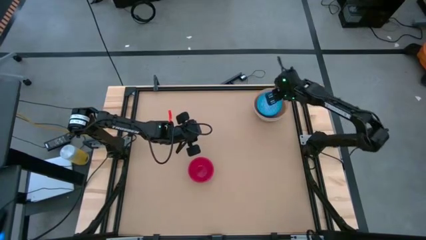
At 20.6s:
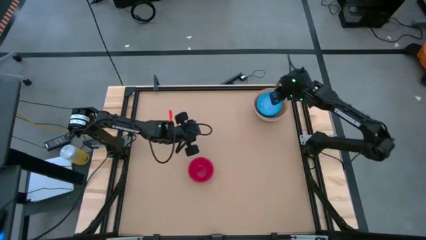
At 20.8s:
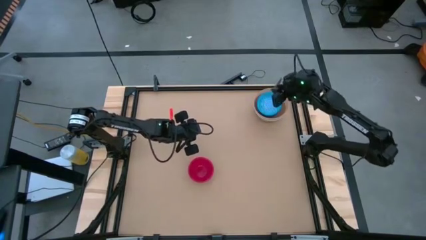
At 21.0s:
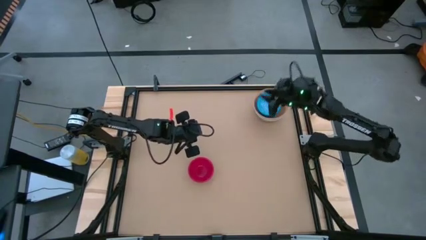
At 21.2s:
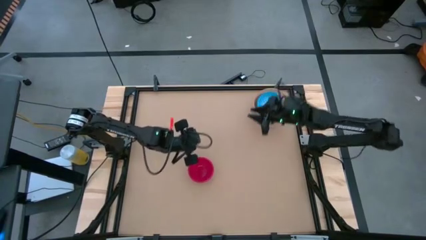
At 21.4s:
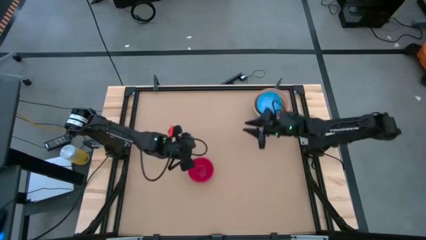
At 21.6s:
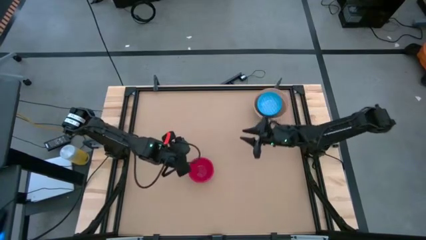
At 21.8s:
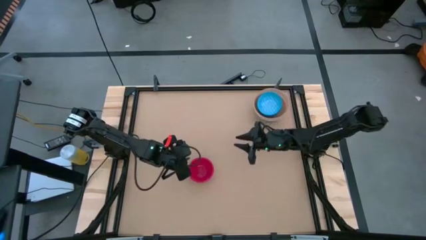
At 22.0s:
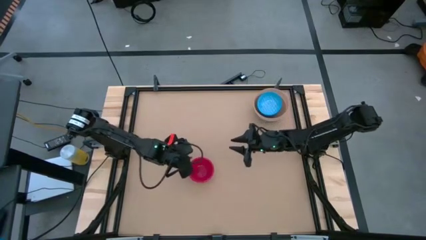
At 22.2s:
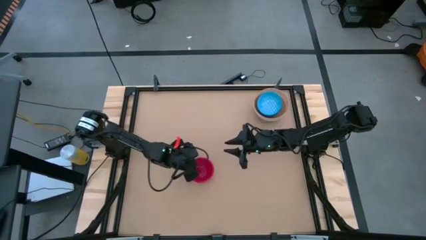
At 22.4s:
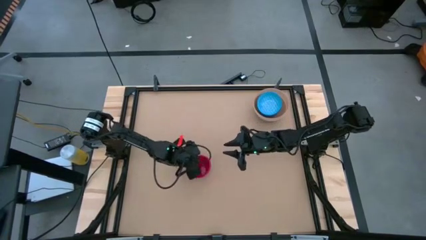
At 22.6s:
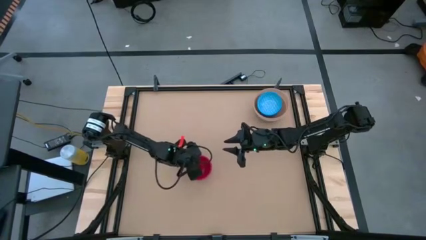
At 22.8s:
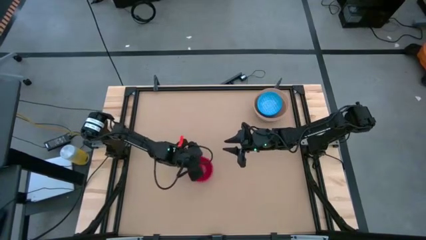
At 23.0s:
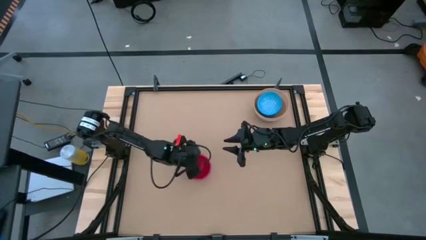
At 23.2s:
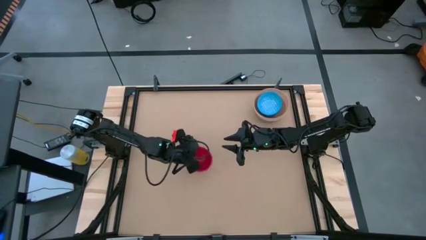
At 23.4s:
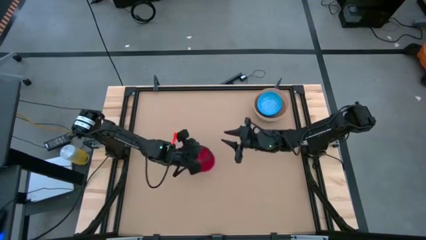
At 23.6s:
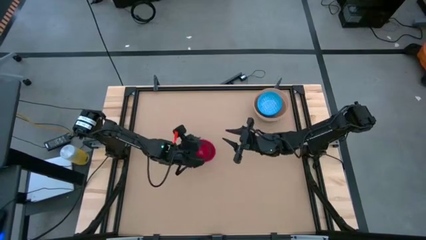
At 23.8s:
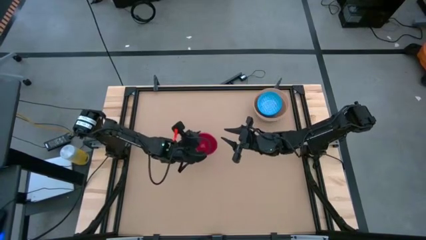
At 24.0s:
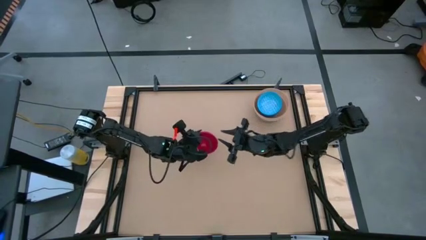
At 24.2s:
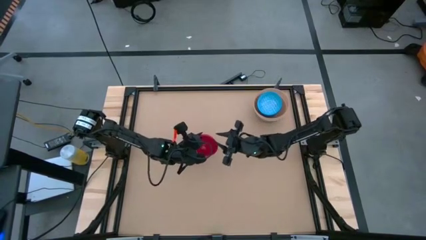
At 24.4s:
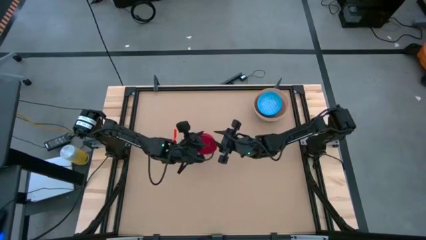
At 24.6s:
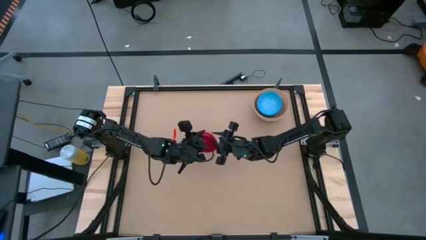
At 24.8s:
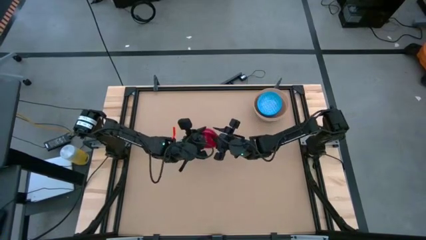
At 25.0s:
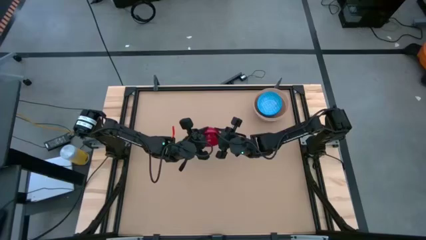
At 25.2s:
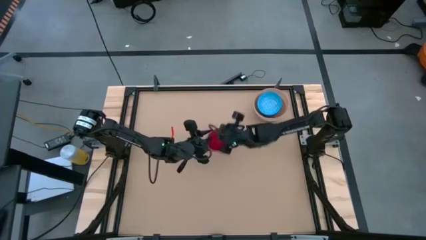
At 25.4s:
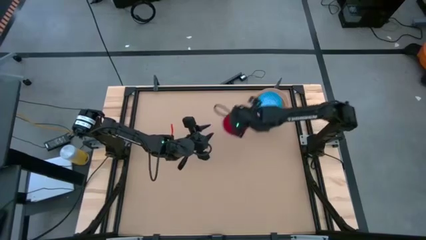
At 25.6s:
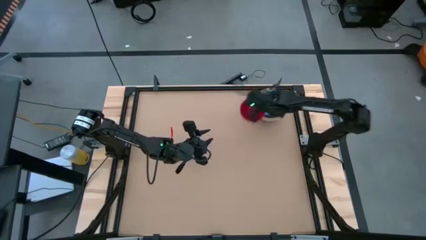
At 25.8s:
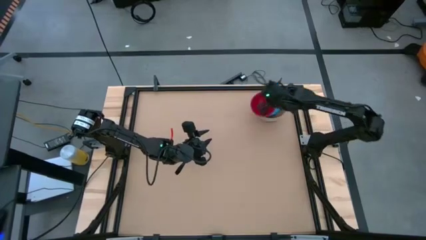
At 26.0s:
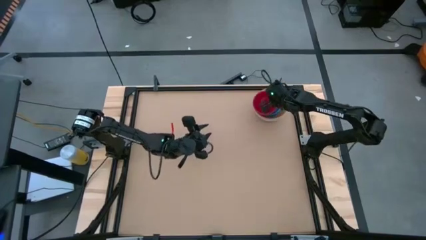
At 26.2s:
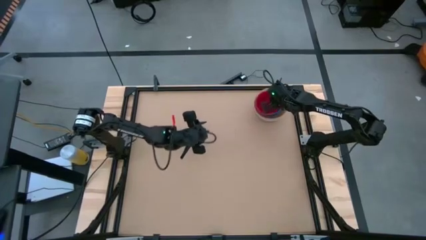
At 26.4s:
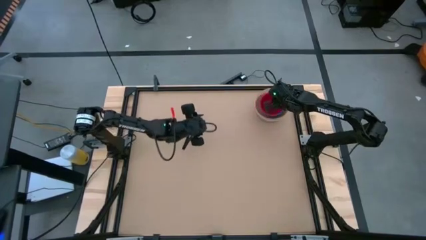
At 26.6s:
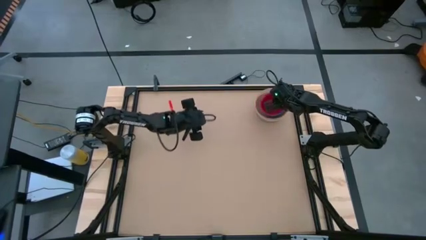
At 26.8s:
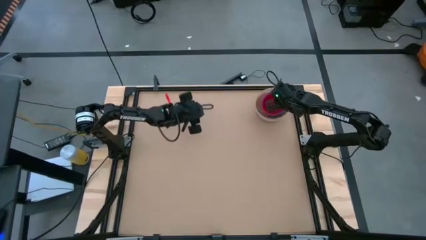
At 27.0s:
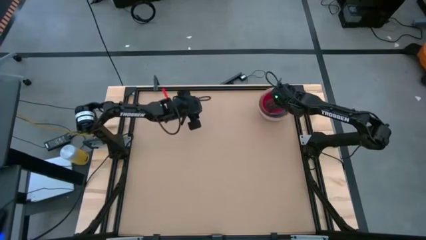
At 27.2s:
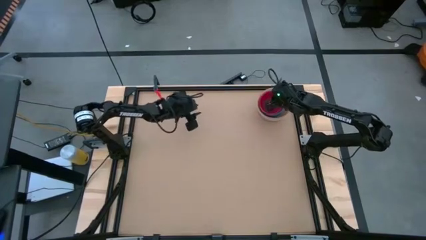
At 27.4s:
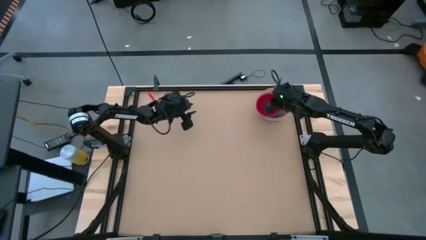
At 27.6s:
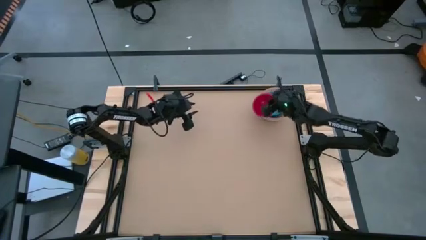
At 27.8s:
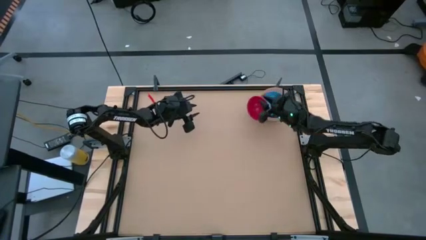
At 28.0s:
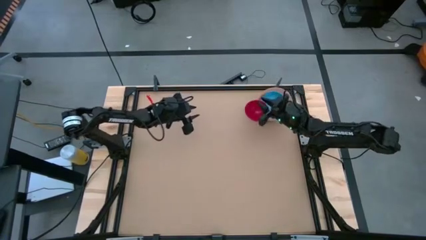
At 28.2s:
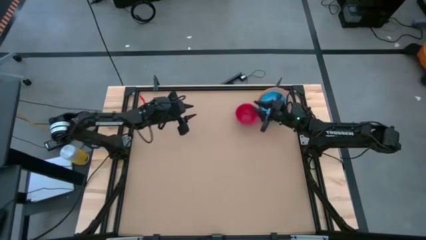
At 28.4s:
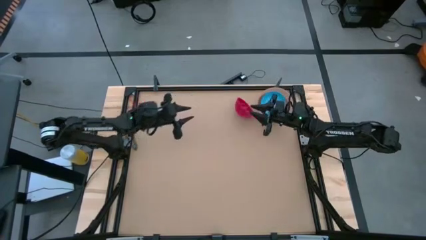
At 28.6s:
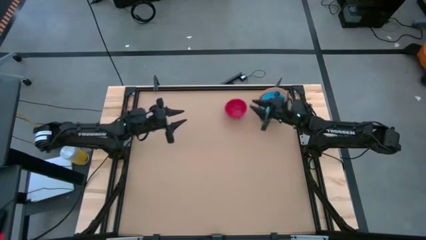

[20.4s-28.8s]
Put the red bowl on top of the blue patterned bowl

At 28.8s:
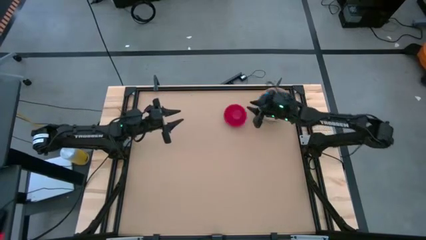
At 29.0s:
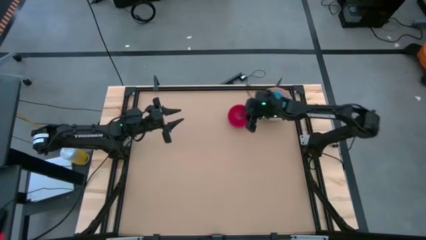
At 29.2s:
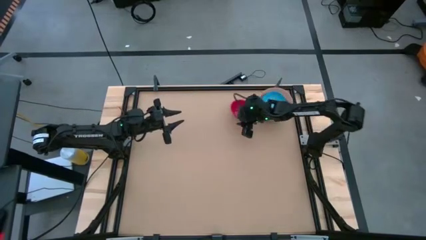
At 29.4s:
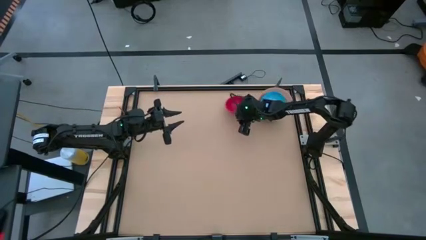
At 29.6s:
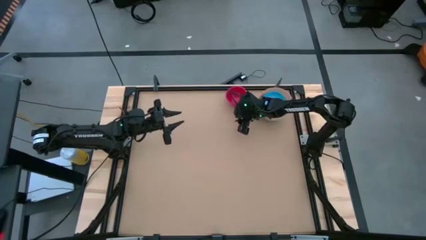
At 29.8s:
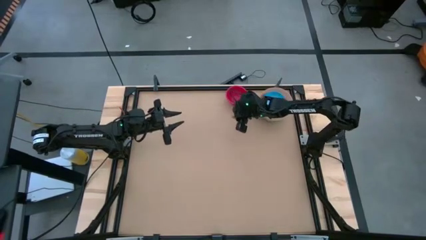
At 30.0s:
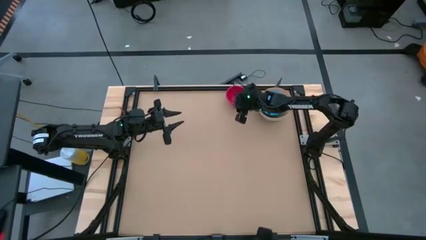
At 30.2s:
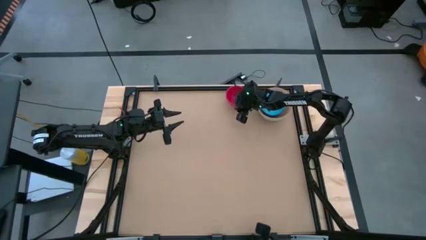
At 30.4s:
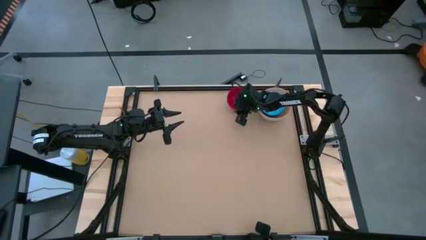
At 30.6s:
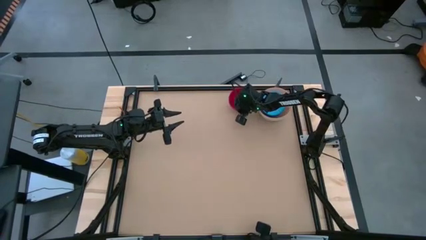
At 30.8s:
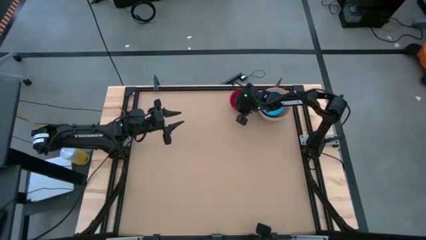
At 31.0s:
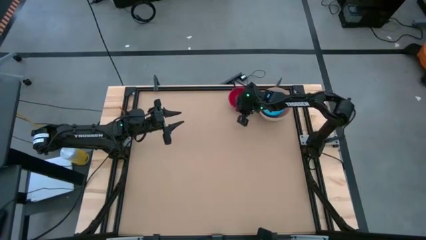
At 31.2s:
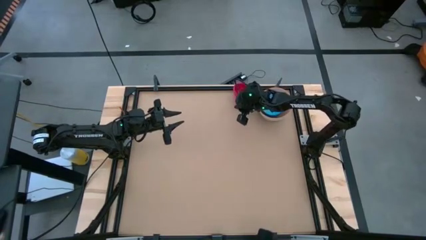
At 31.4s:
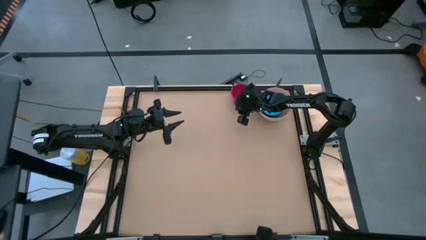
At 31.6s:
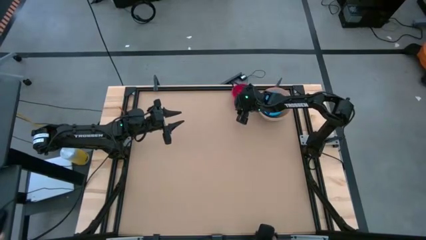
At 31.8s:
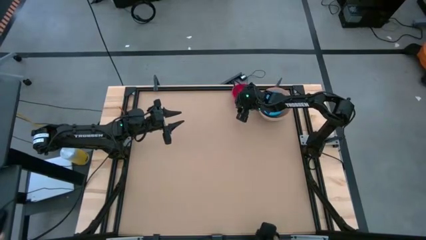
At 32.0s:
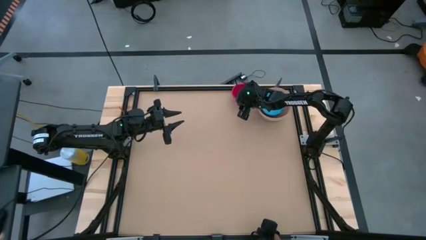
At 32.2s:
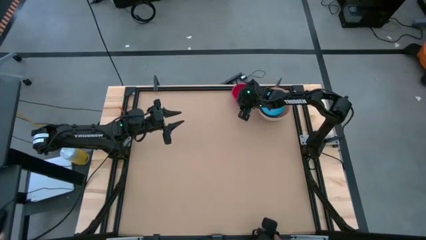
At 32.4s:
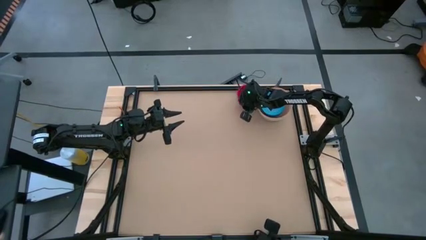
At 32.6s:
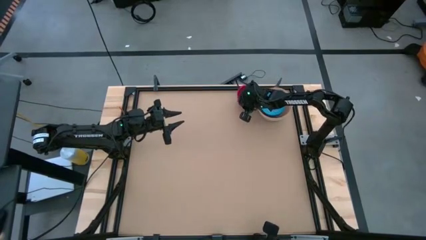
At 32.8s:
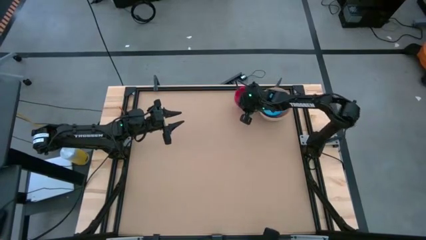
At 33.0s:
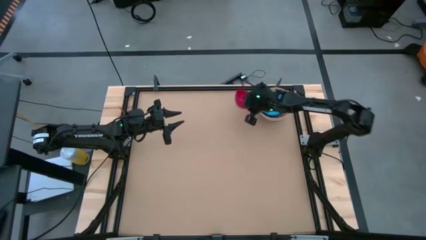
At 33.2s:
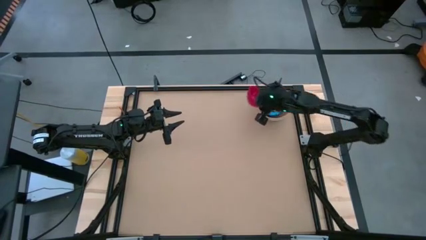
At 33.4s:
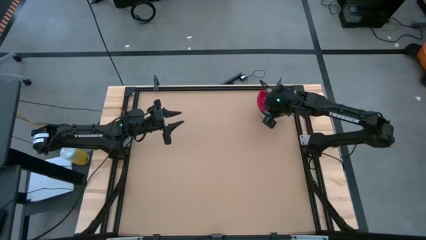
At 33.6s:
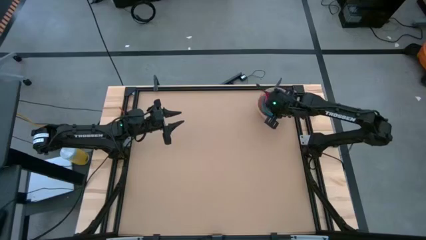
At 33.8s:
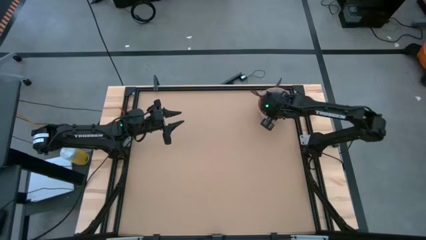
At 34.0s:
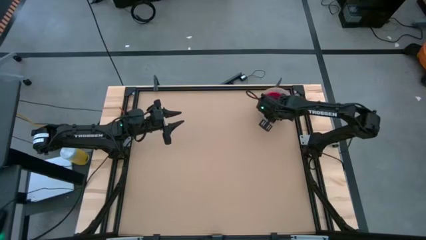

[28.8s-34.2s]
Put the red bowl on top of the blue orange bowl

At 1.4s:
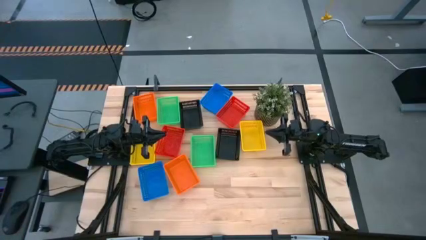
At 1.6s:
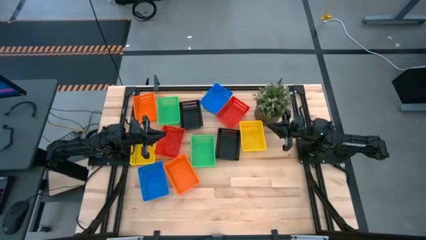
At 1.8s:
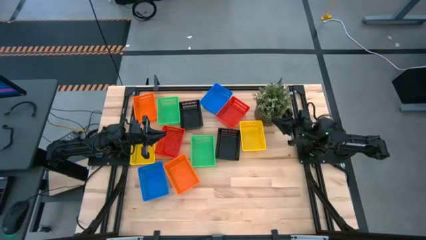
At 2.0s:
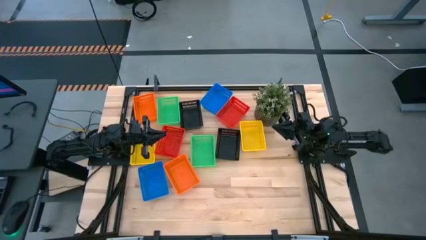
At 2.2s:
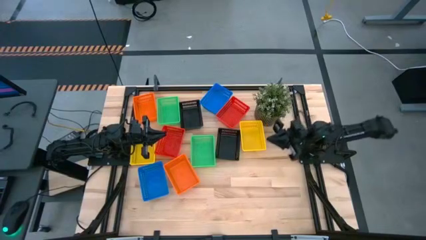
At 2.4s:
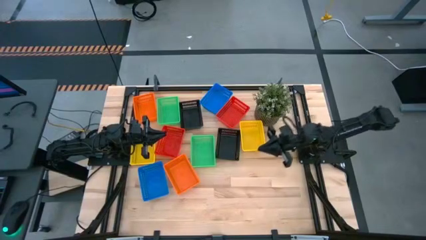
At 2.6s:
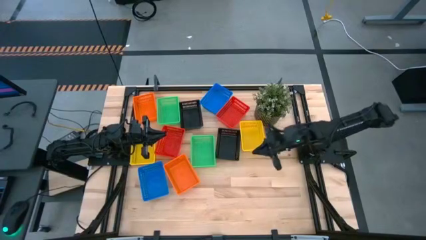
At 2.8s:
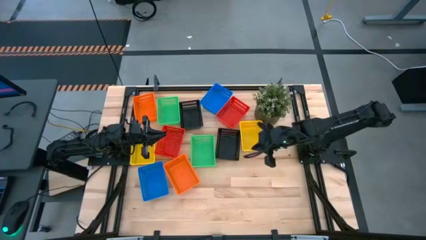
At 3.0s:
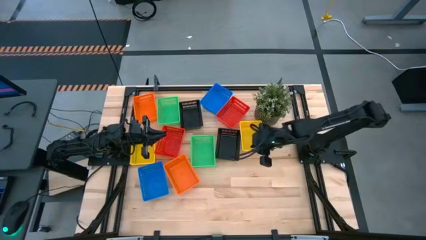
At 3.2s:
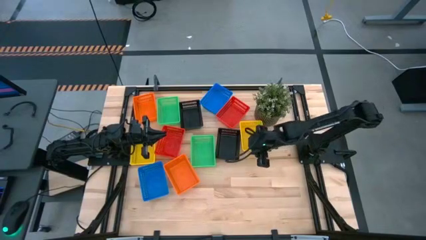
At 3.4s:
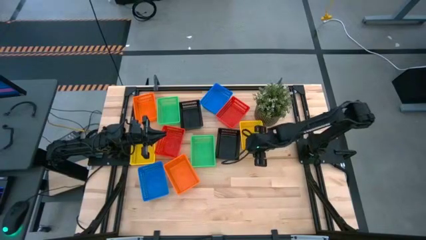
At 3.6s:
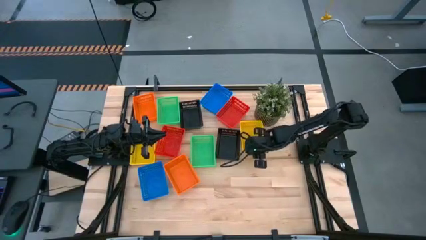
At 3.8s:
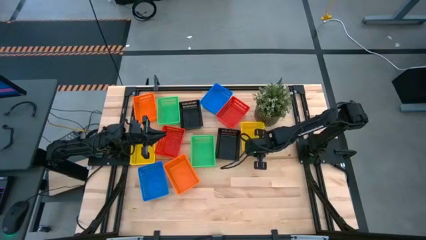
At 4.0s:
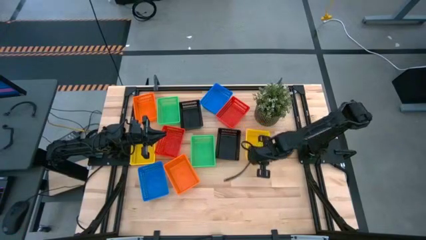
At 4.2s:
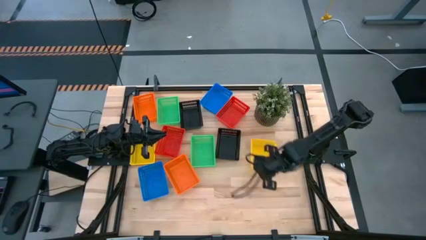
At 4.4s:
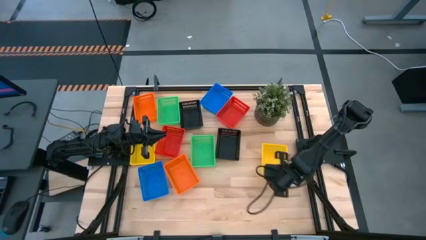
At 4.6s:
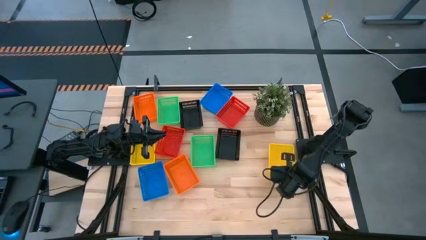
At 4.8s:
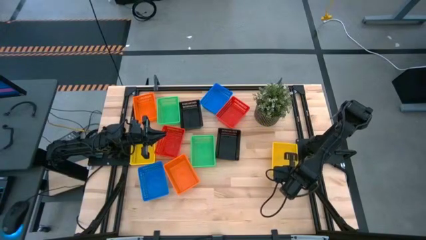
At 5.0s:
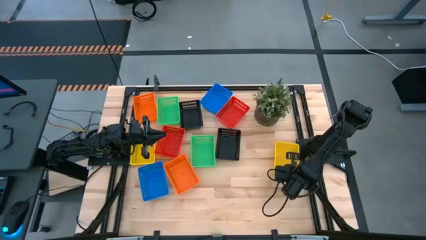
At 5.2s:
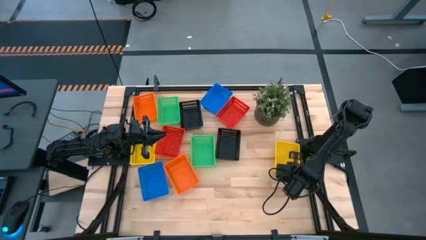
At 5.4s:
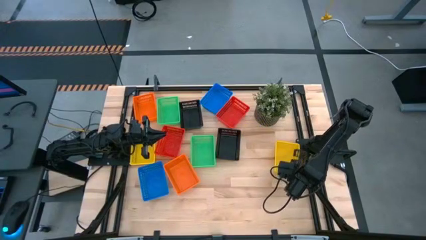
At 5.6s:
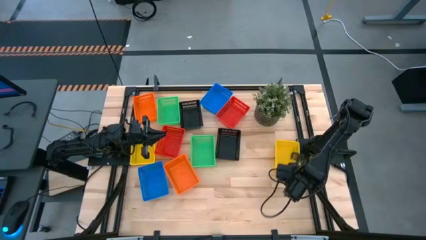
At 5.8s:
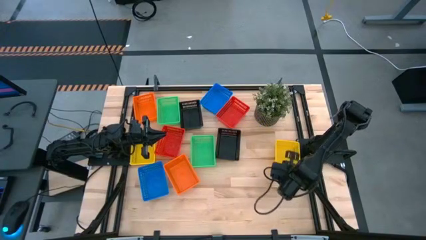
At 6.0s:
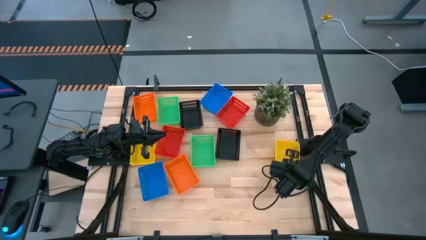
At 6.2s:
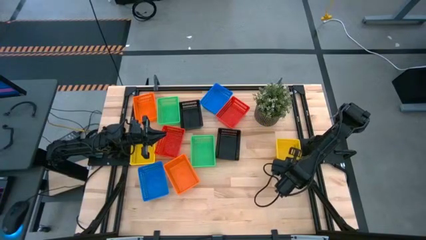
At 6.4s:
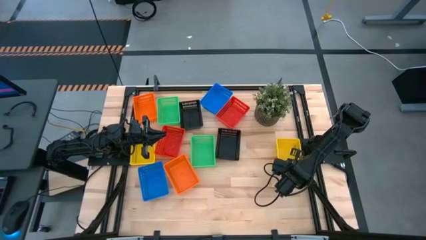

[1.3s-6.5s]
Move the right yellow bin to the right side of the table
